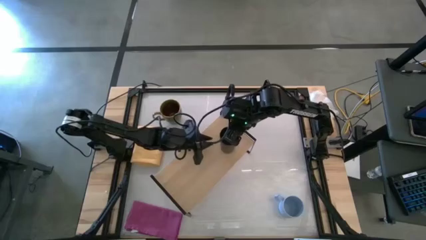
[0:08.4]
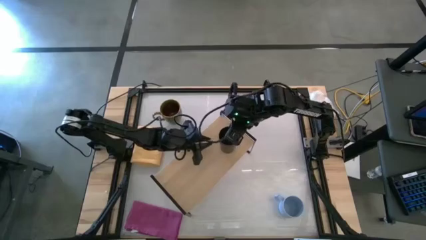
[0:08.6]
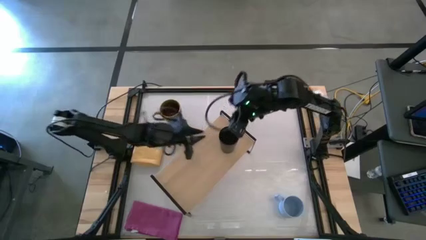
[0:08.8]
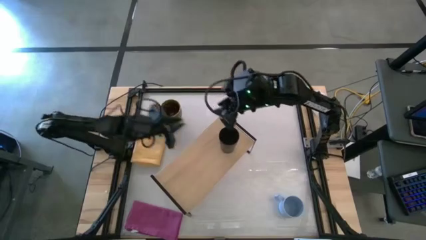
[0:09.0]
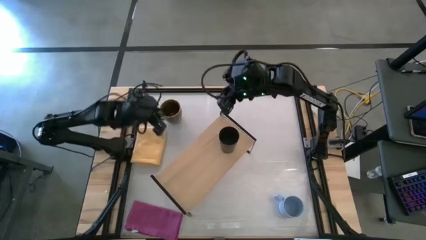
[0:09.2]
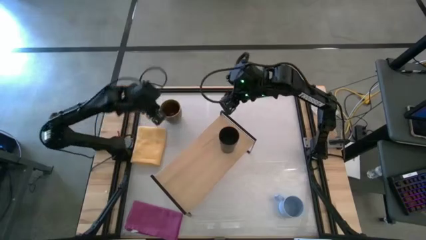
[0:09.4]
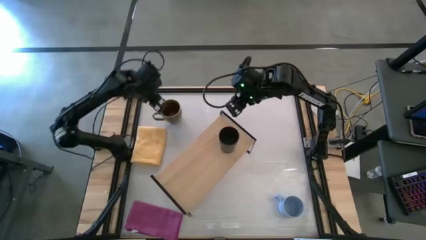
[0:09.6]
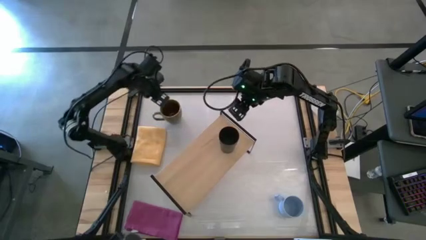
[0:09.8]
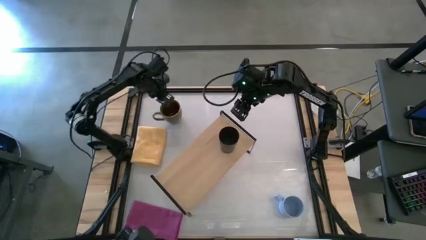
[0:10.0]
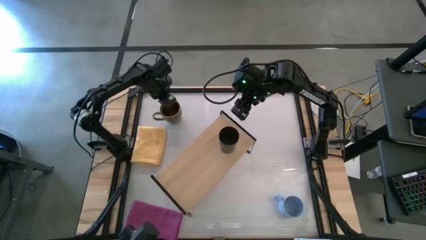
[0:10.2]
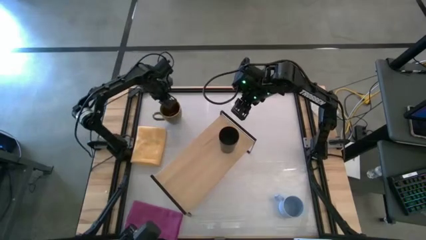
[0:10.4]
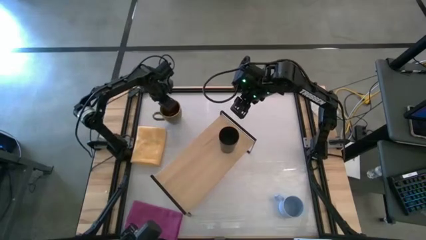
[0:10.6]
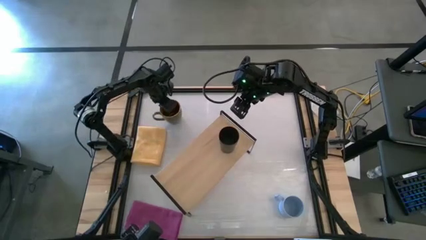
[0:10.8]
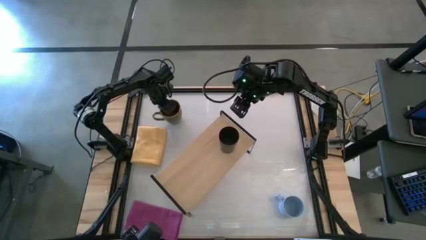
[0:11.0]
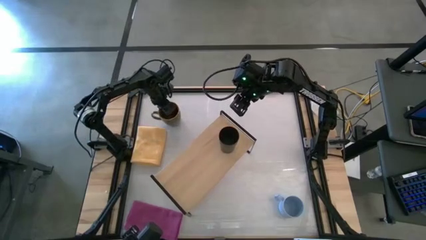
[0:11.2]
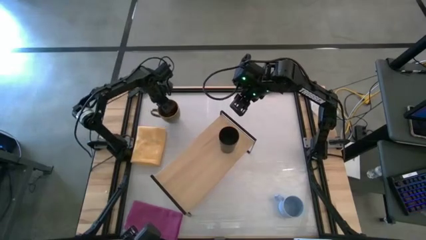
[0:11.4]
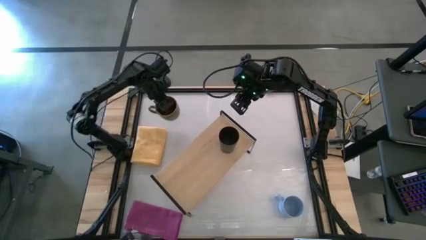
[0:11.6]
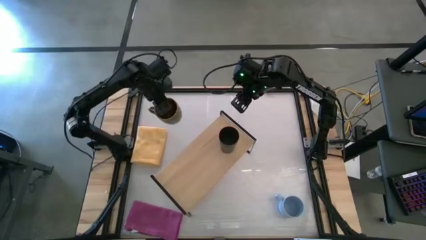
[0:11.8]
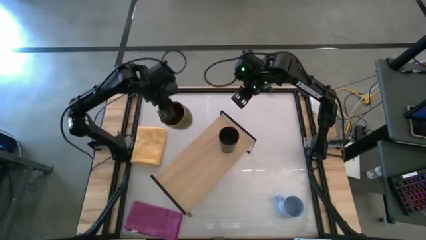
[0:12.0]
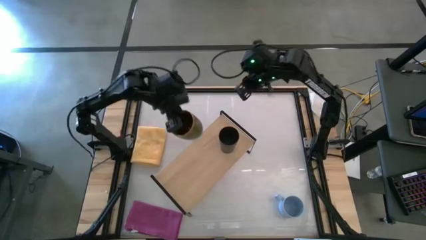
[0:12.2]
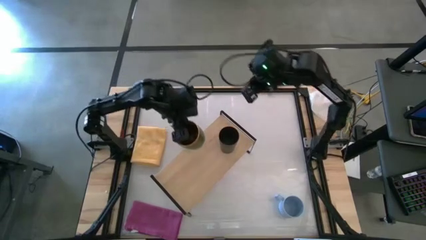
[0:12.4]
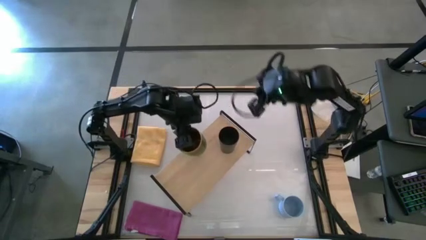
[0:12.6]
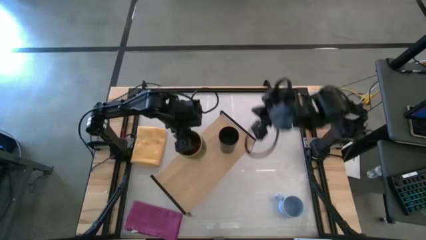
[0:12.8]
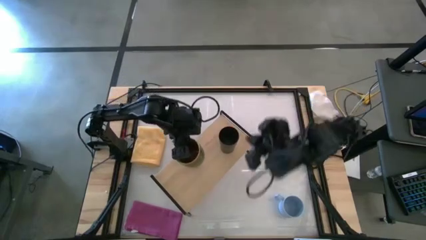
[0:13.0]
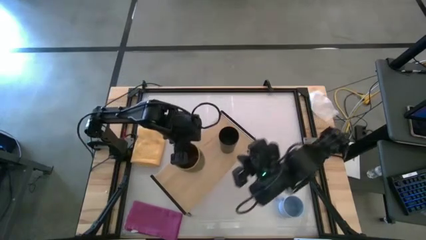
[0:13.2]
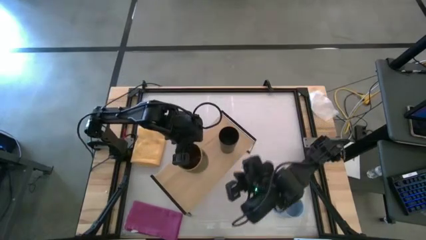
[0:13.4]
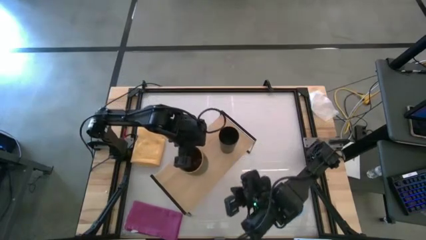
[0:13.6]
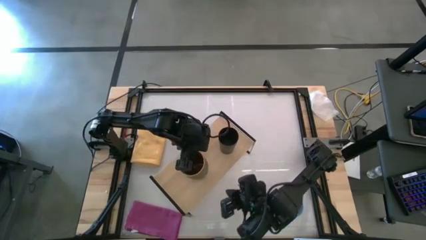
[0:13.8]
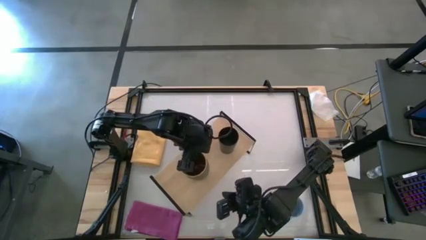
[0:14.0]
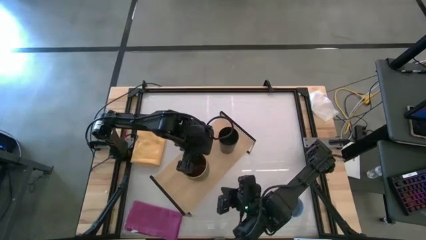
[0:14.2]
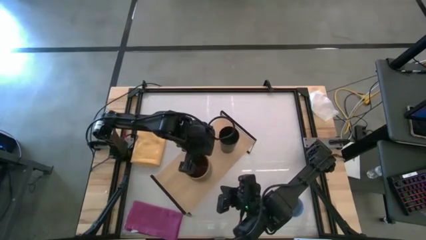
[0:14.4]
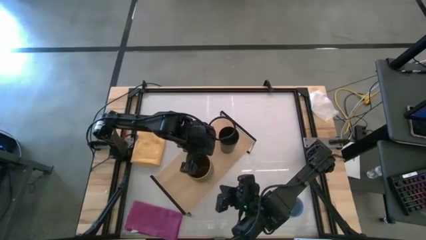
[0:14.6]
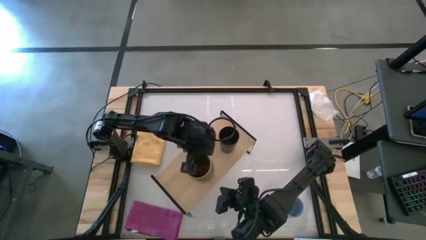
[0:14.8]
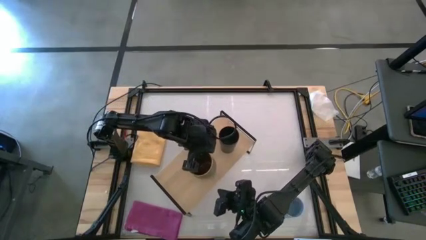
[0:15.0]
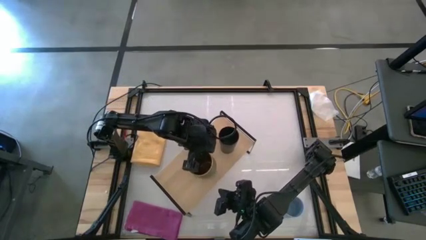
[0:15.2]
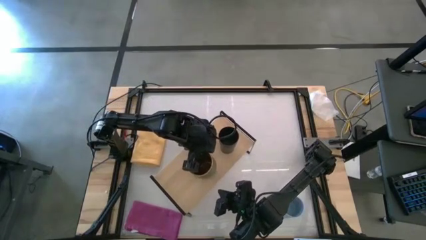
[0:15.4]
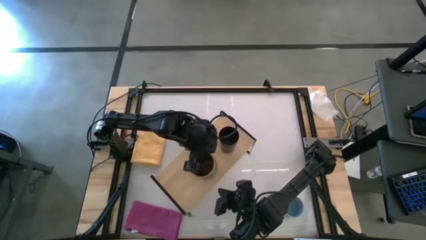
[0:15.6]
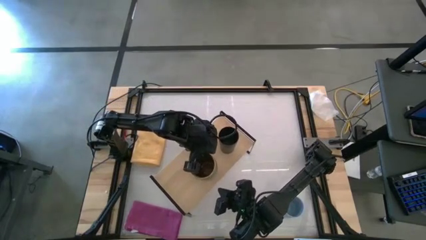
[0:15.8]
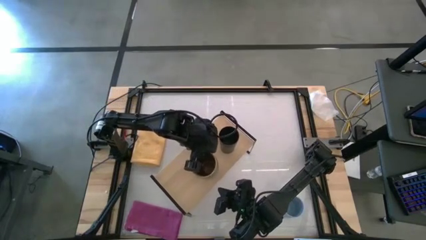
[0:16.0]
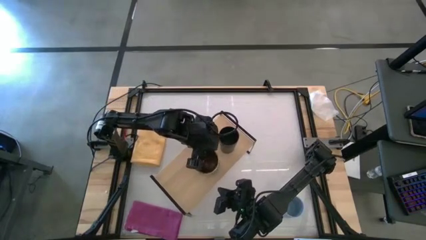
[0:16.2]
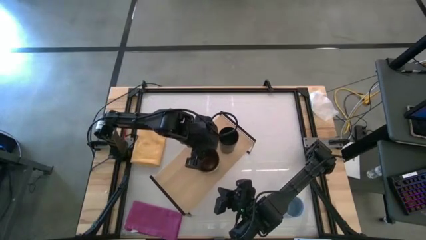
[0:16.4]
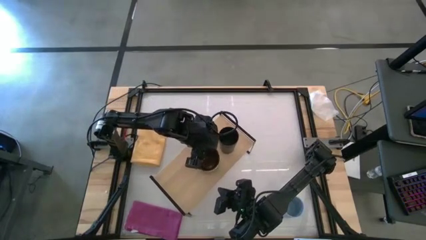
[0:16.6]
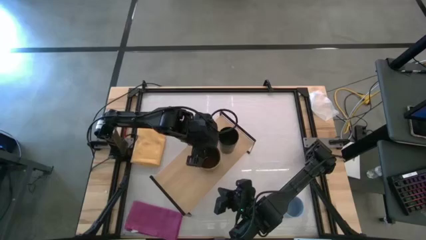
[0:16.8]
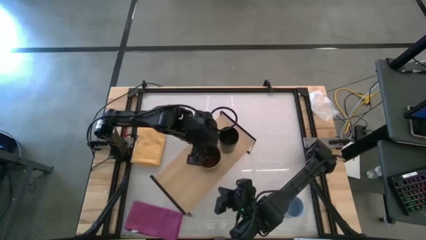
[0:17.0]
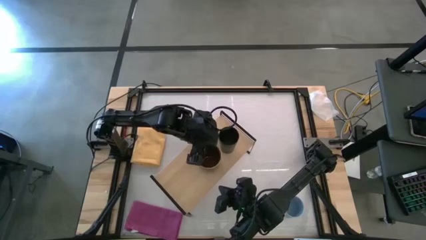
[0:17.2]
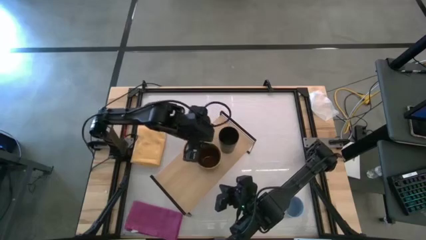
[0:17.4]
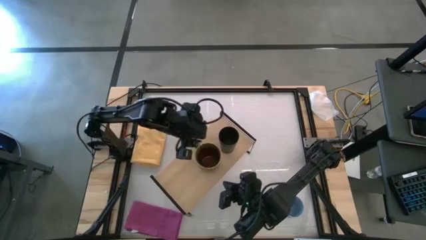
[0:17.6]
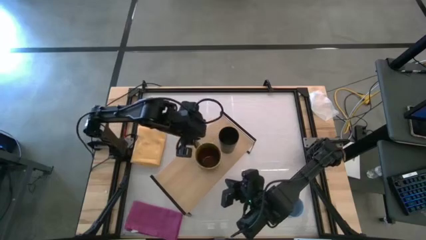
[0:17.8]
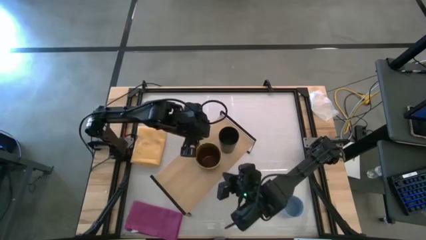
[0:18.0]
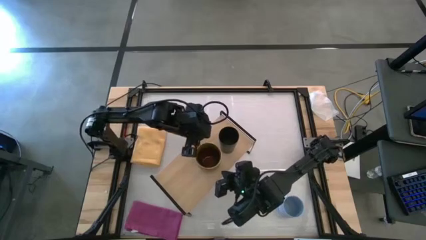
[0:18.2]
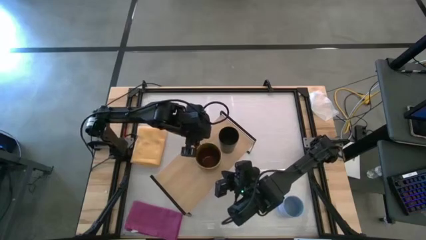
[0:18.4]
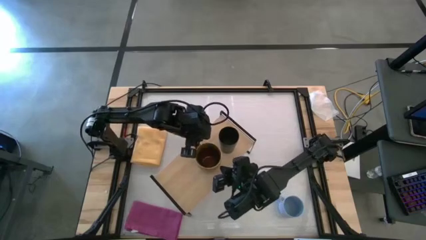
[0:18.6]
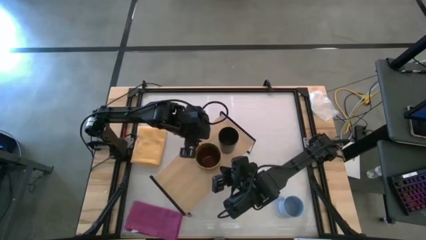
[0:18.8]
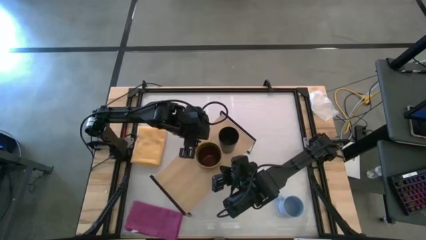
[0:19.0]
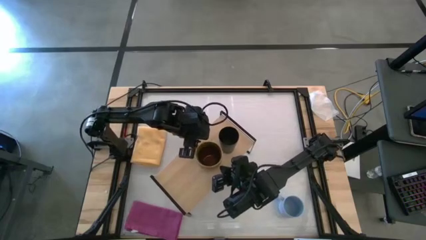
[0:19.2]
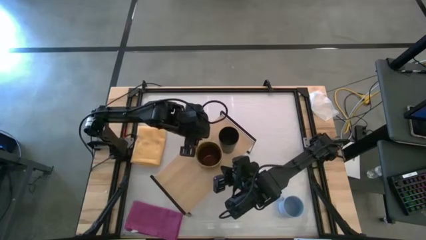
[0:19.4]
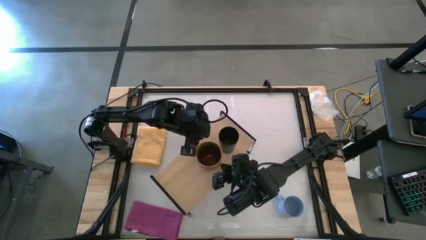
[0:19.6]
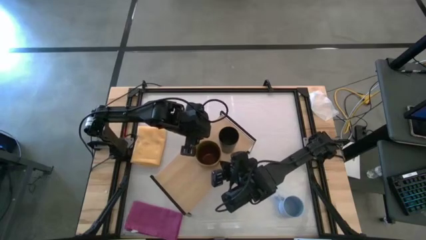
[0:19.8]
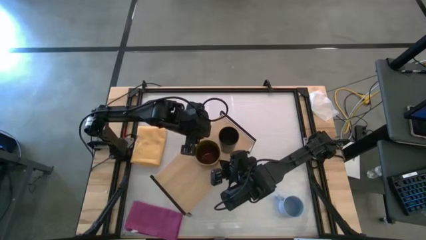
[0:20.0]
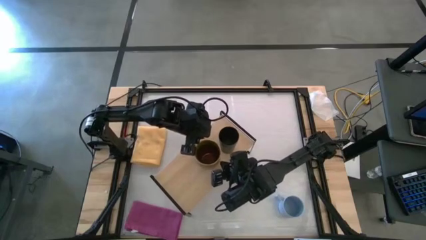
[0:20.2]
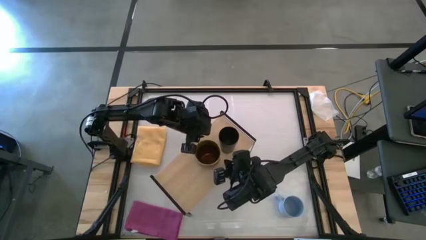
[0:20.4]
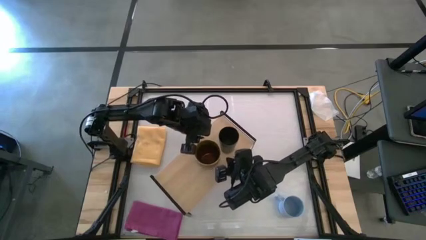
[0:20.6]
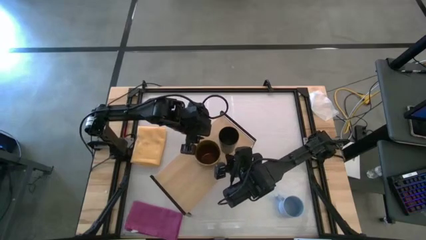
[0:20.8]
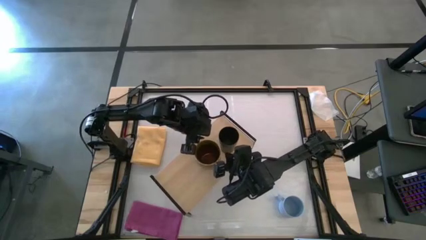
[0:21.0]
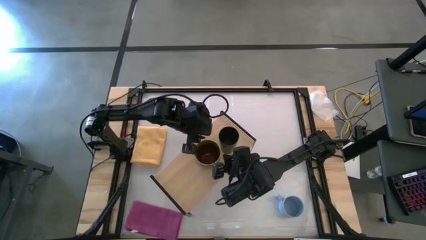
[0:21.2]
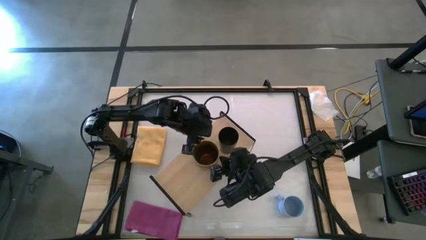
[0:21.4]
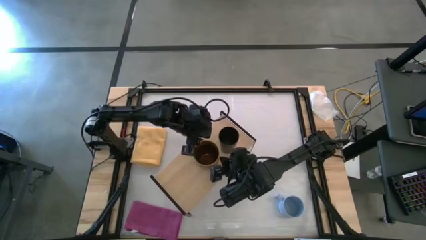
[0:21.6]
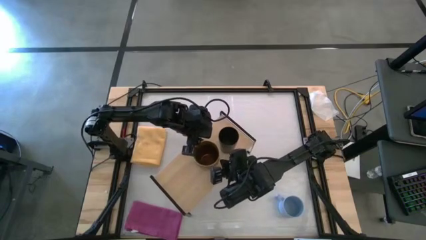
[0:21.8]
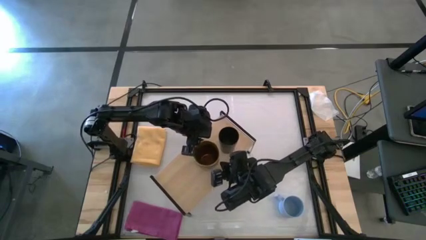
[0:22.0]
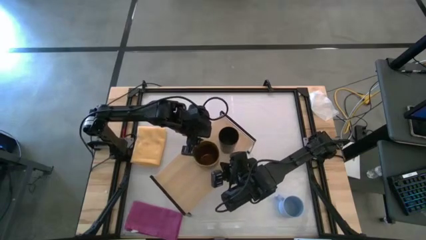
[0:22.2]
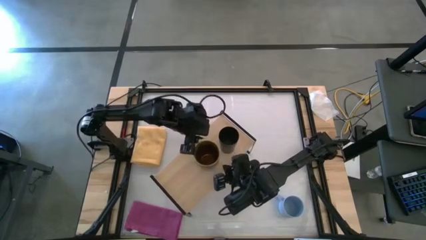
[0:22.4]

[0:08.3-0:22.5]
Task: Stack small to large cups/mugs on shelf
Put the green mug on the shelf

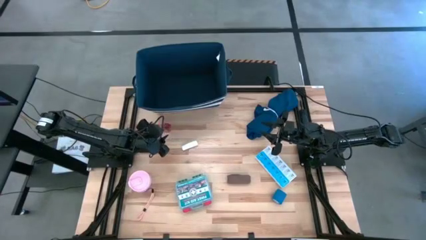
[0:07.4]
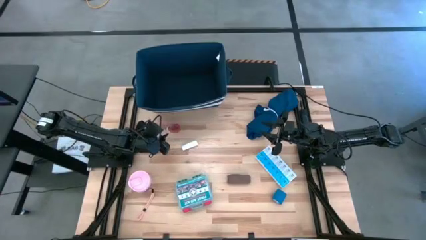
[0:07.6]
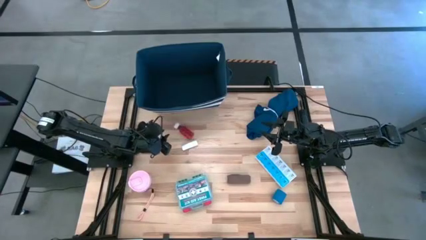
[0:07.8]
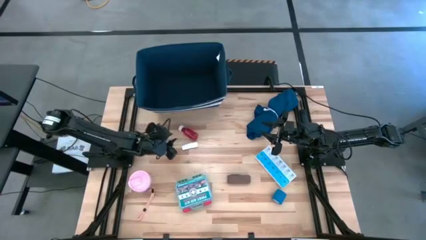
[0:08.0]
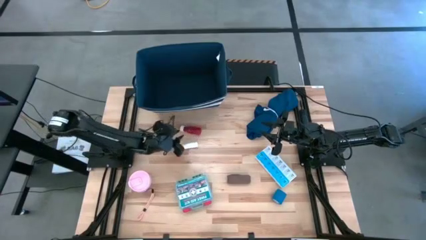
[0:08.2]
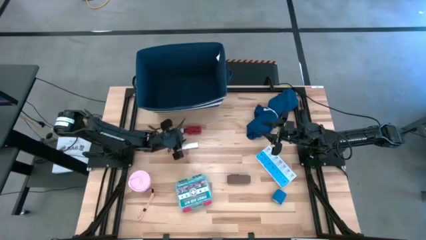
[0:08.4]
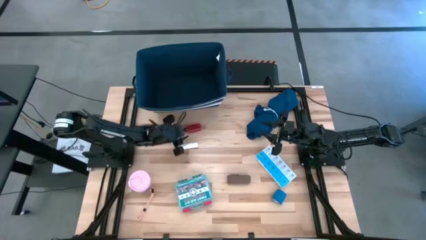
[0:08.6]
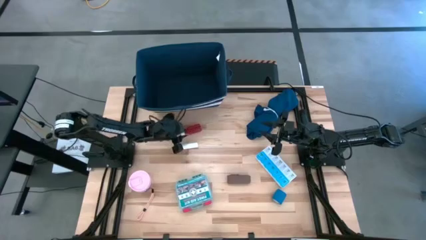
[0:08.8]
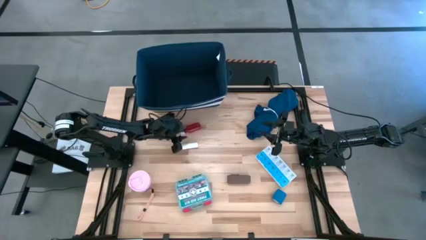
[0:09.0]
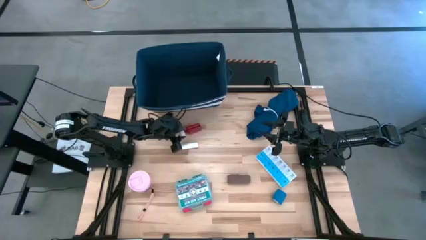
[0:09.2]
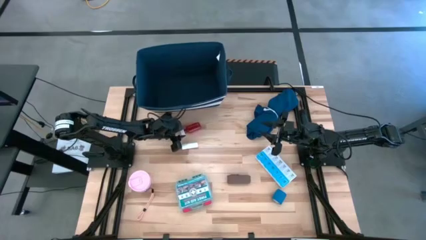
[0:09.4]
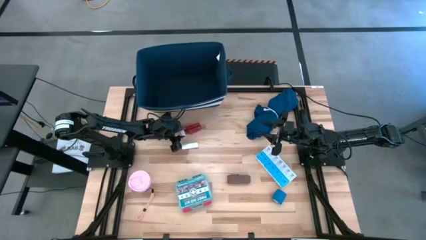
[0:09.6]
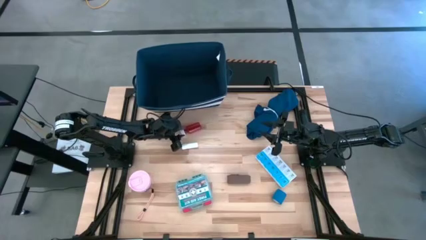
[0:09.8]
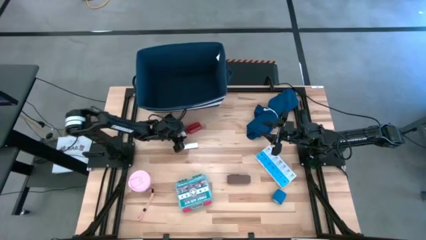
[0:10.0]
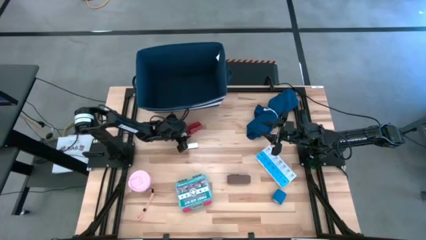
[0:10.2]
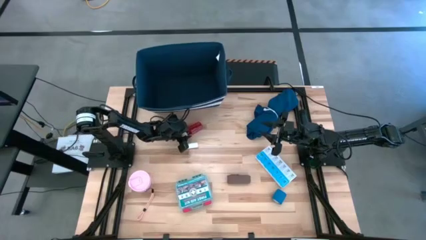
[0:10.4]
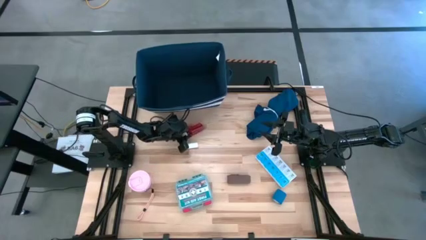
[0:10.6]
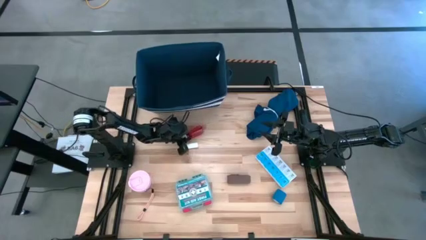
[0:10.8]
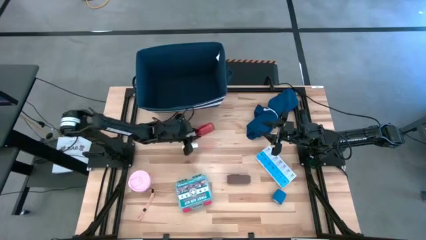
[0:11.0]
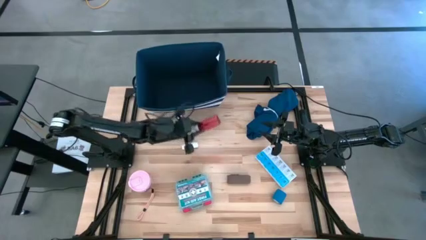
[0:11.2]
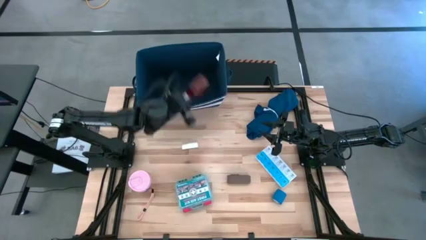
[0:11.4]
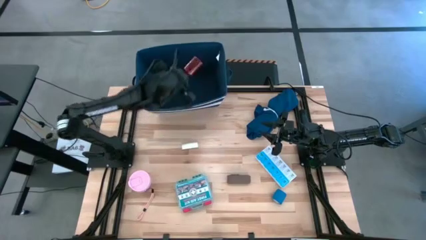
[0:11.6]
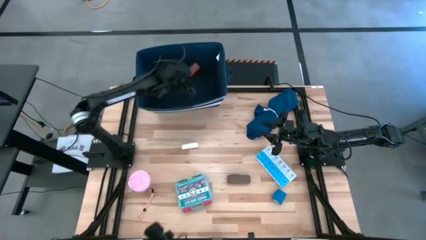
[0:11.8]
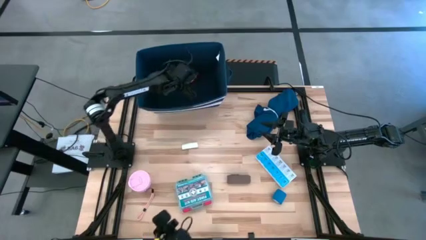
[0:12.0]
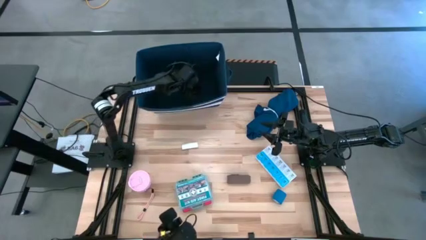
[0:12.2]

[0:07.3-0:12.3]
Task: Pick & place medical supplies in basket/bin
Put the red pill bottle into blue bin
